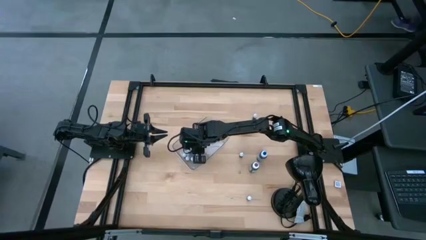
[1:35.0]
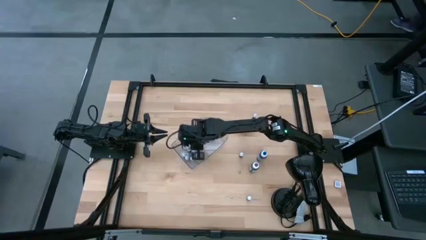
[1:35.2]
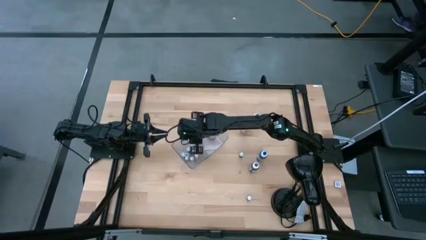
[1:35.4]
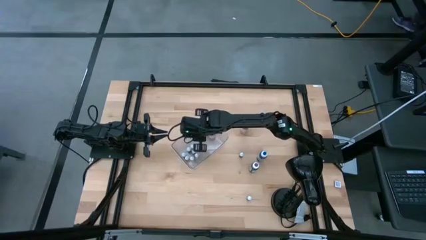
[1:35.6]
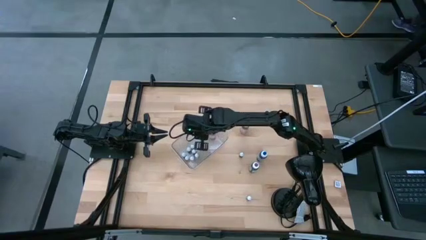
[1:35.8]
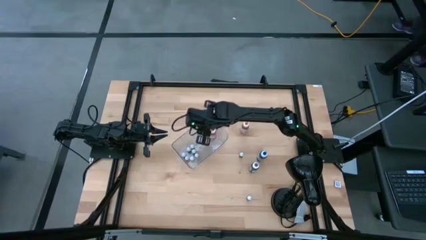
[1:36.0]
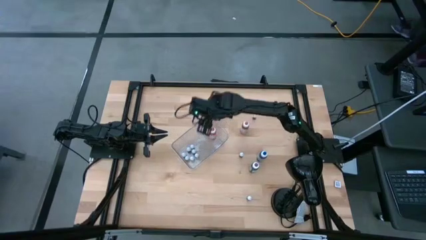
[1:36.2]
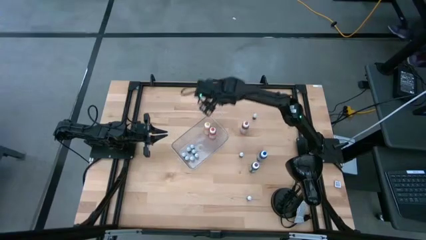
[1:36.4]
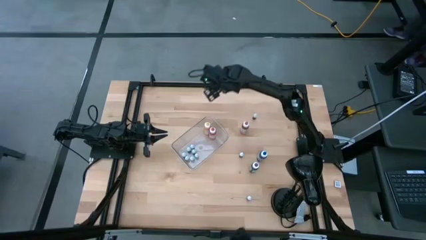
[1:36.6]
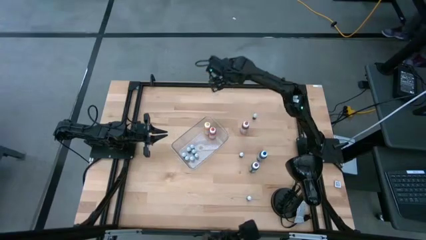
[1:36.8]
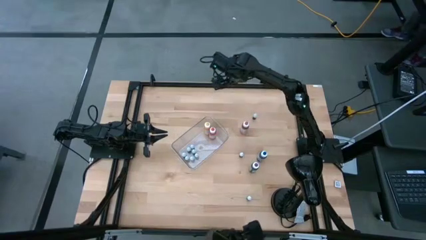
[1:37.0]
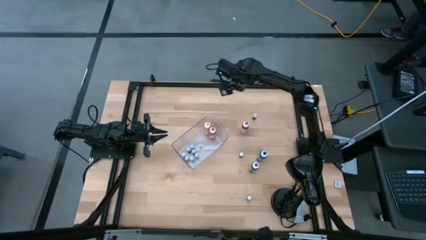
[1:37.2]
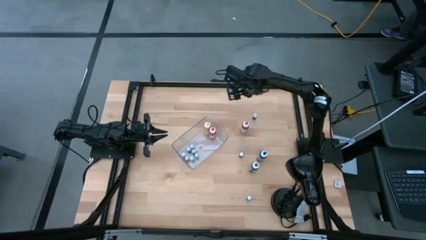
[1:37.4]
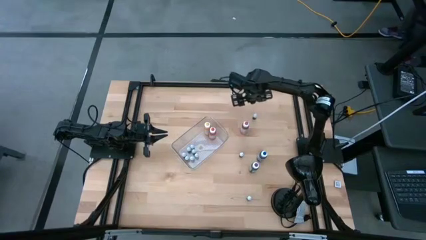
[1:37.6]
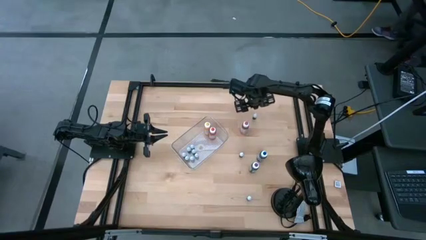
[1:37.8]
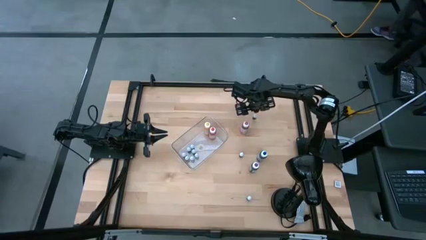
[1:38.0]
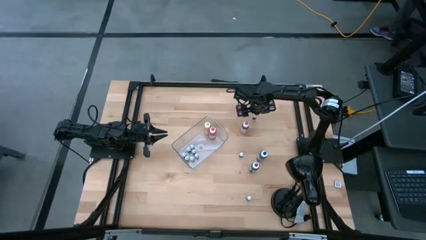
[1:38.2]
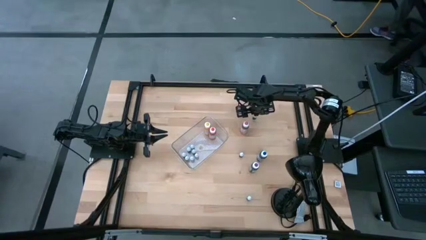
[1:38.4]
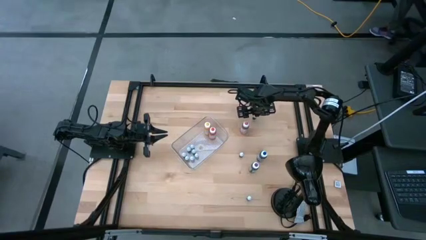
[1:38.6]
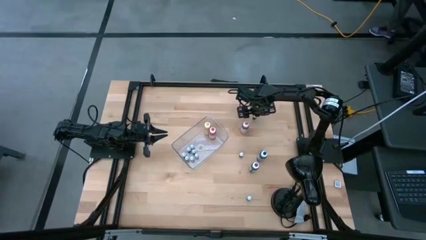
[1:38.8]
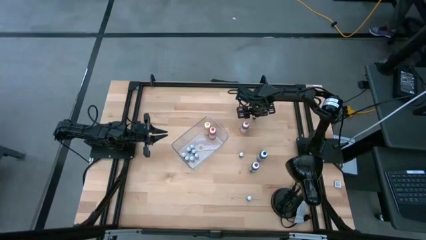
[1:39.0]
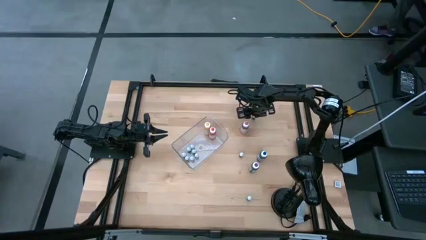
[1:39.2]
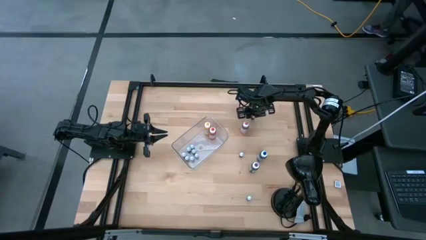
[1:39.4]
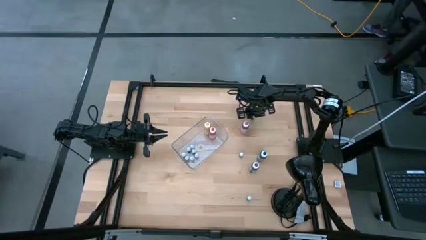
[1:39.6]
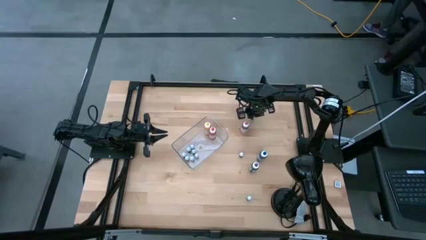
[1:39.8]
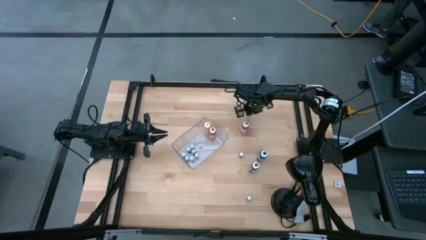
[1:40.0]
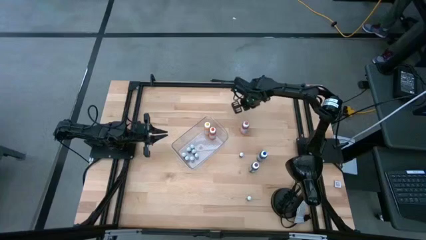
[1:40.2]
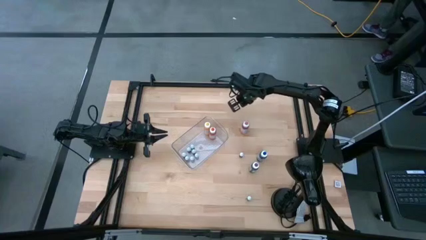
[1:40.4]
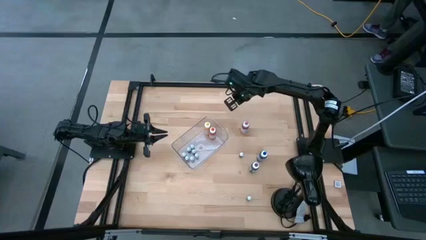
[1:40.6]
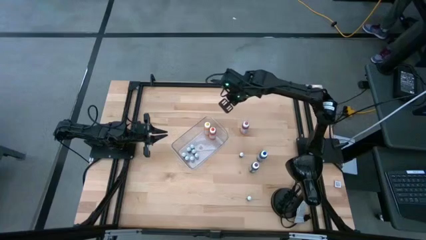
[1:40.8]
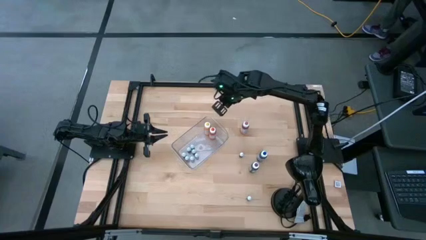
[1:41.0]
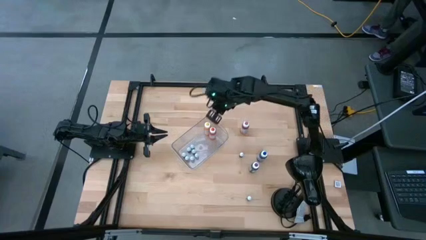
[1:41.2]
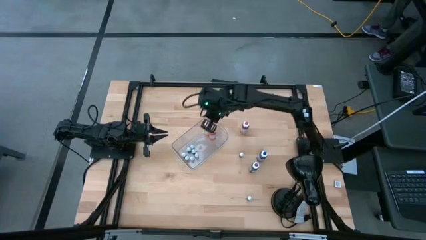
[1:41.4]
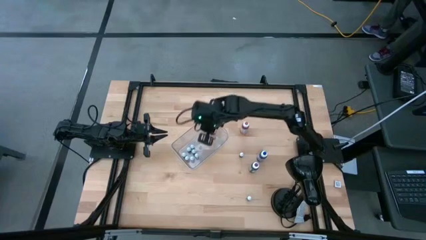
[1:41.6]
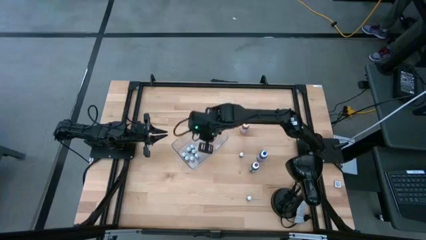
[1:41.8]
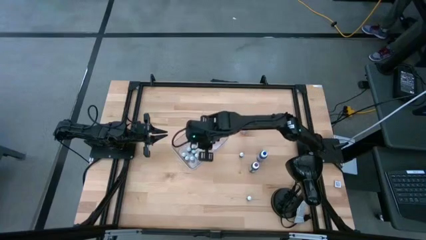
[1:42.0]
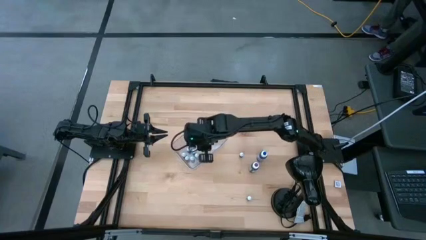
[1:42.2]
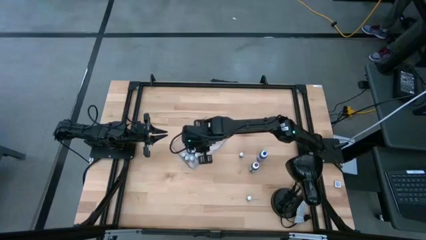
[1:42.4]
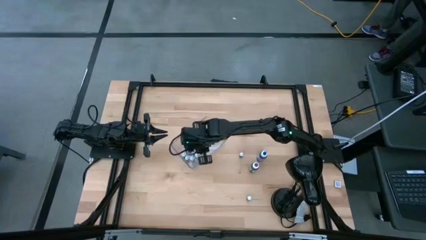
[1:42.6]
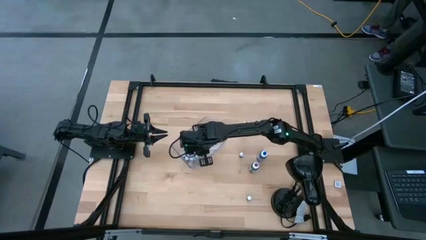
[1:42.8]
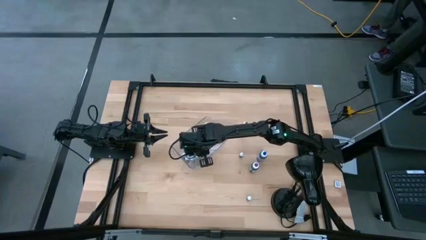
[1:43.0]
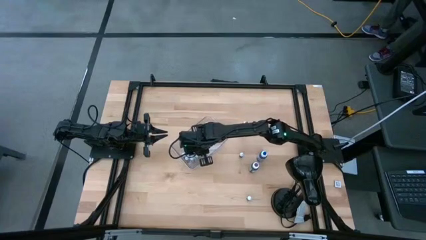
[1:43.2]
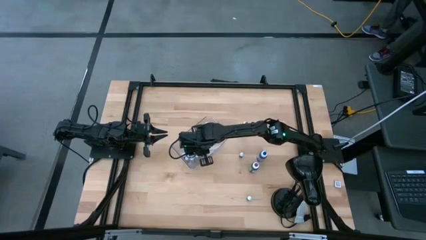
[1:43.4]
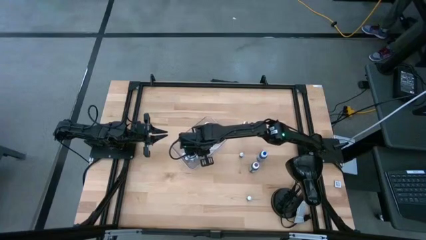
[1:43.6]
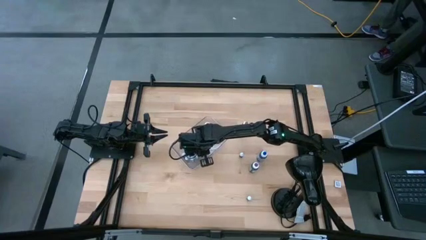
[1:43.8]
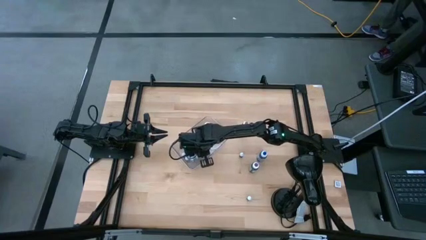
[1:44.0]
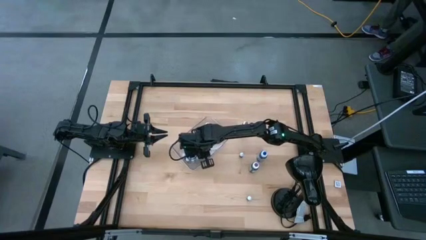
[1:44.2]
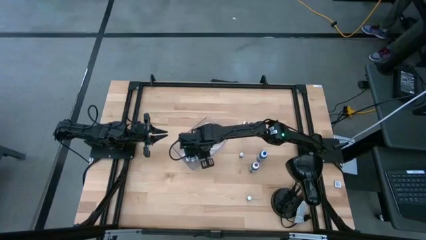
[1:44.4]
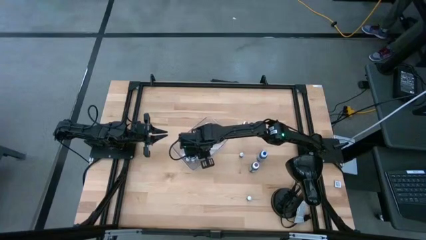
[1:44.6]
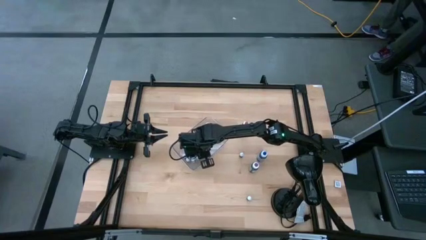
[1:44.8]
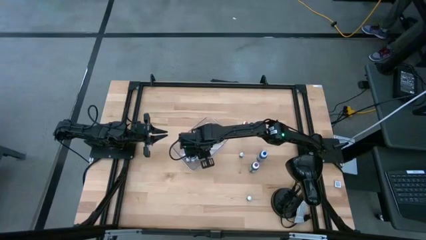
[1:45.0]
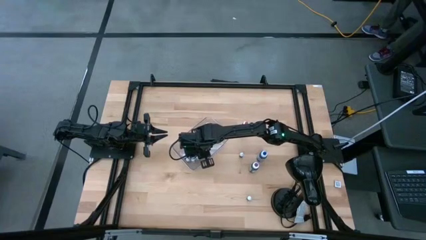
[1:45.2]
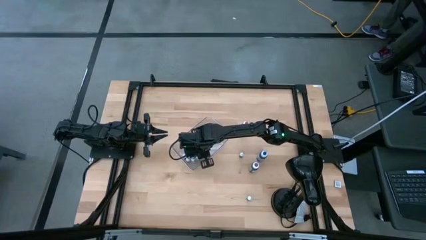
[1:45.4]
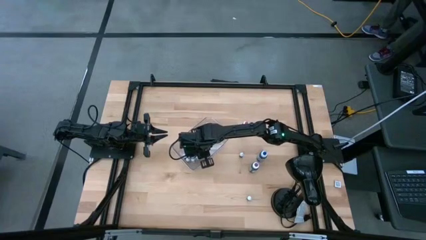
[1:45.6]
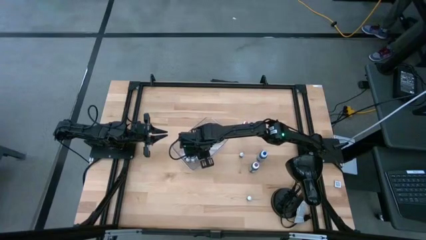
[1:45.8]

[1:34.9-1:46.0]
Task: Pick & Place food coloring
Put the top small black food coloring bottle into the transparent bin

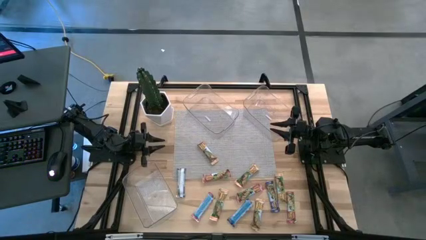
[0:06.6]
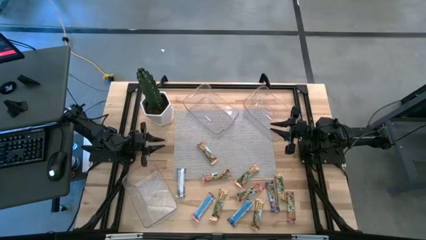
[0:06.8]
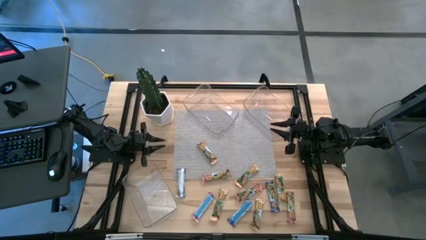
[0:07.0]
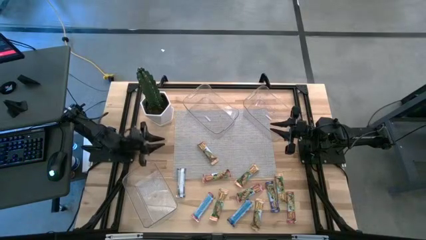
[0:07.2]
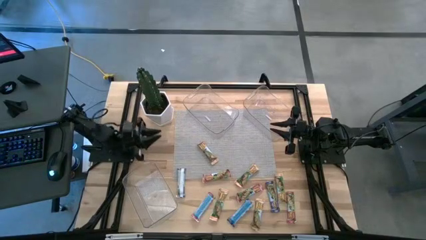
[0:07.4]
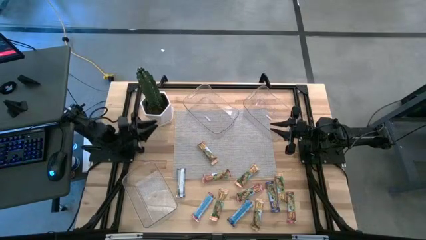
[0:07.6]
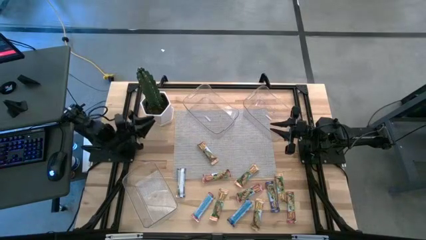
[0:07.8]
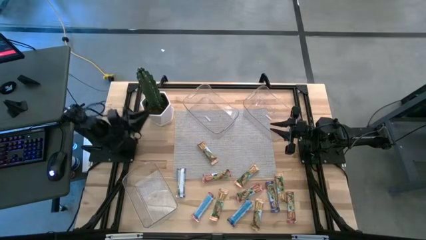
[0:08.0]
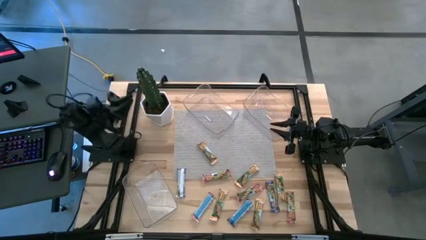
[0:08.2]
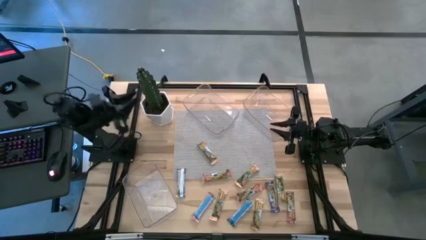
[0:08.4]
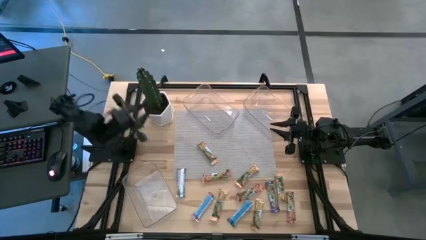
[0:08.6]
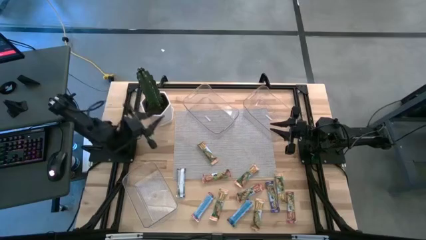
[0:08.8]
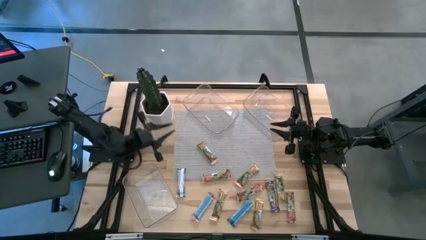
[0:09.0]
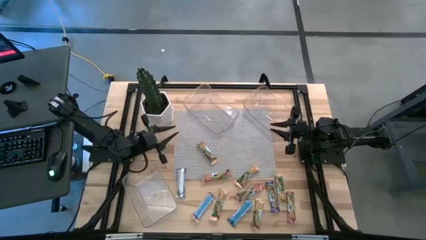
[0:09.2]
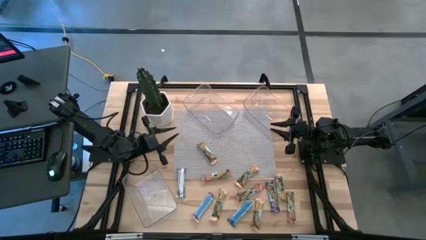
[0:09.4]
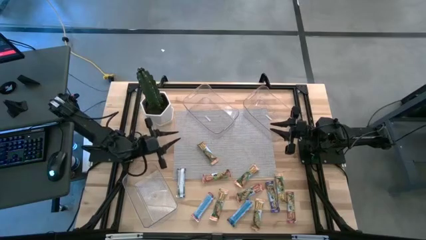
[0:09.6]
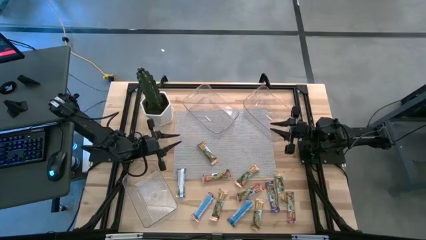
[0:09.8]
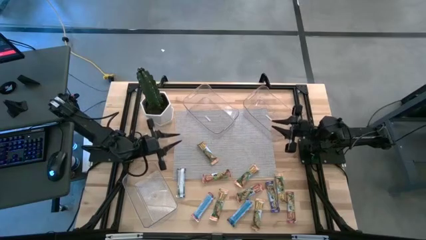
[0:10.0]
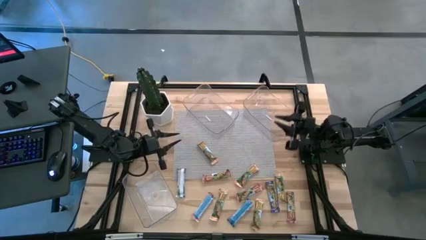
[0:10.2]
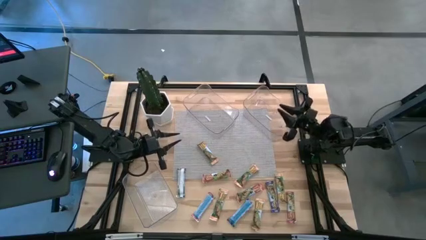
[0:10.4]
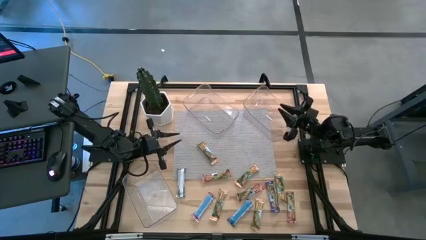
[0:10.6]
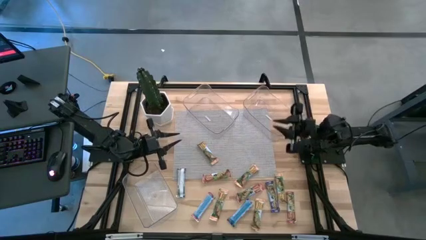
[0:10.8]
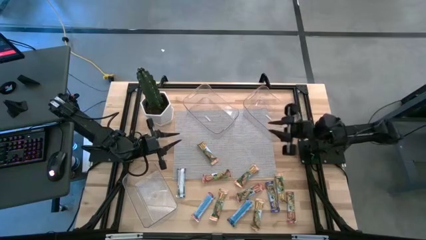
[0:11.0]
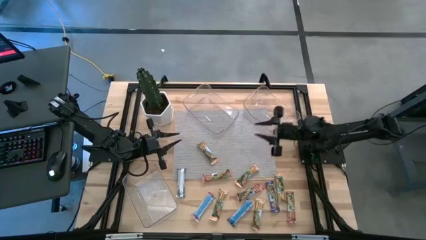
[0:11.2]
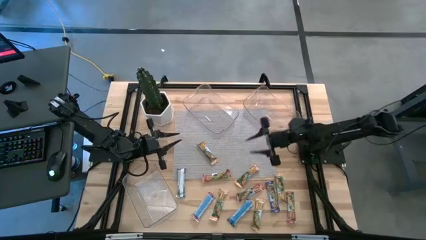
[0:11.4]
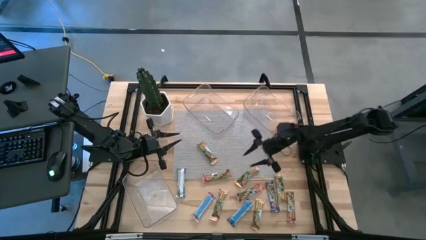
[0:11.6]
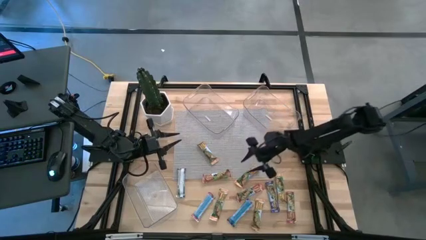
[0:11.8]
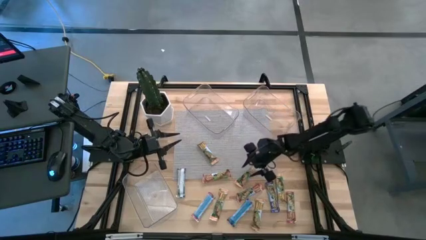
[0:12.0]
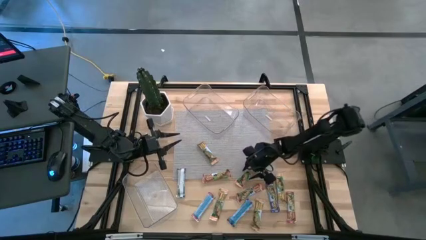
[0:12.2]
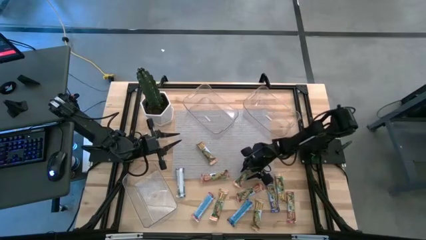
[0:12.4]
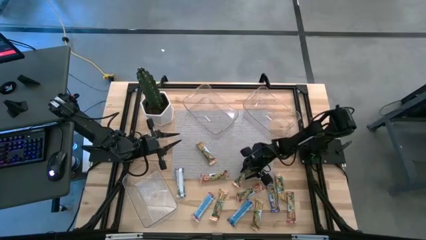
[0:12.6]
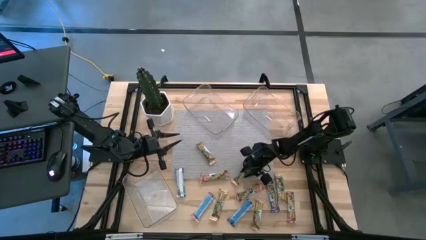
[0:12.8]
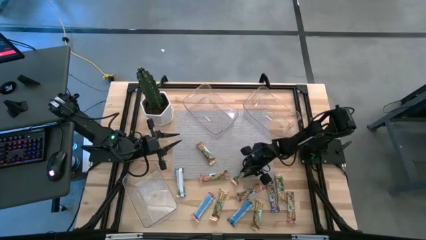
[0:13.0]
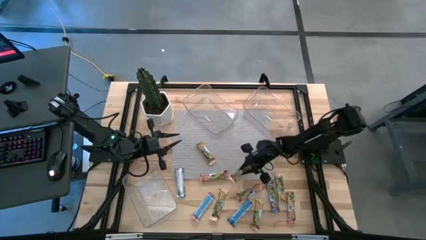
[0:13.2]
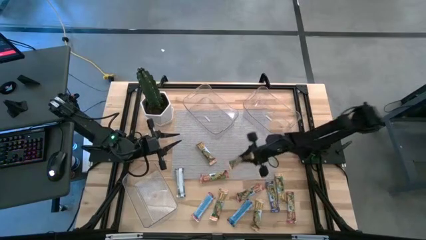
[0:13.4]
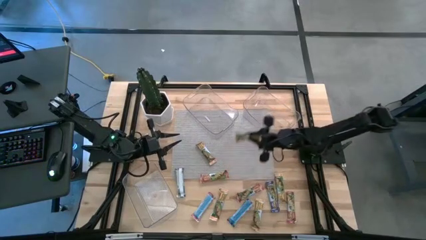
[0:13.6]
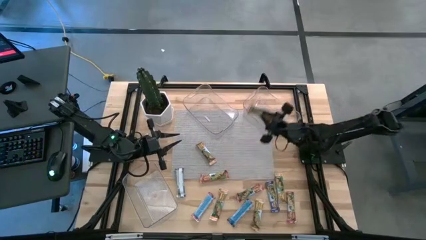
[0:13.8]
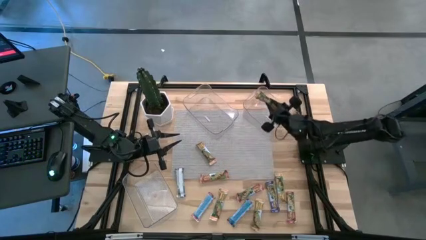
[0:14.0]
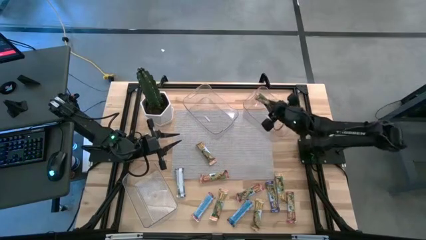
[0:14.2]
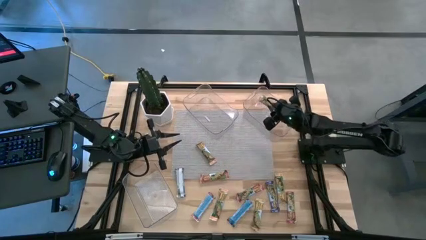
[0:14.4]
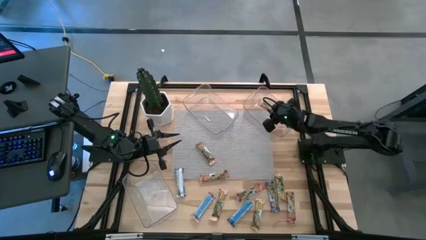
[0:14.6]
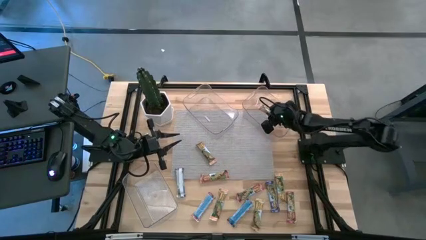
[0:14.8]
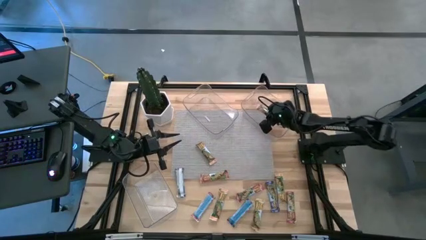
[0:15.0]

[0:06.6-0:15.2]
Task: Pick and place Granola Bars by type
Put the yellow granola bar into the top right transparent bin
